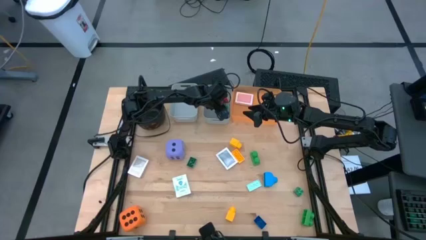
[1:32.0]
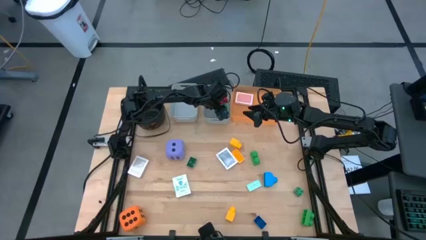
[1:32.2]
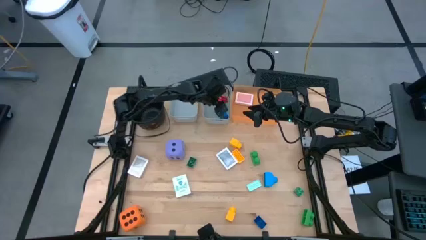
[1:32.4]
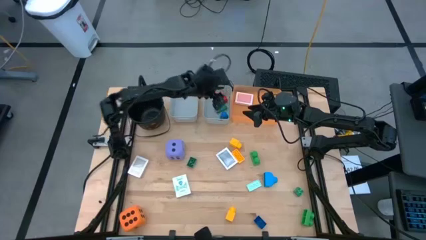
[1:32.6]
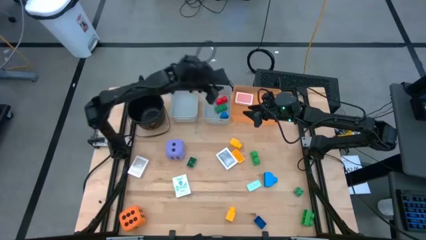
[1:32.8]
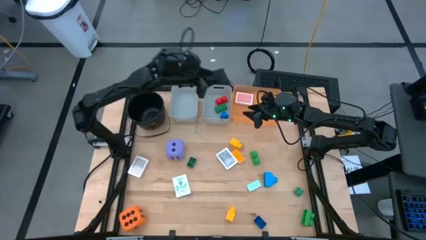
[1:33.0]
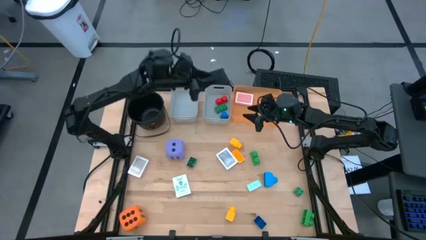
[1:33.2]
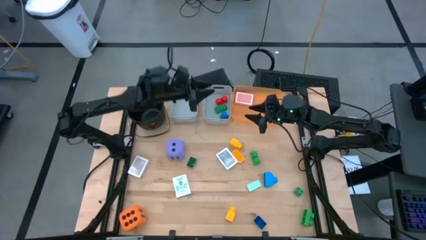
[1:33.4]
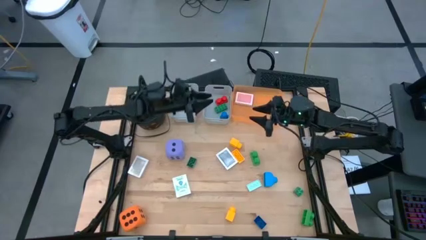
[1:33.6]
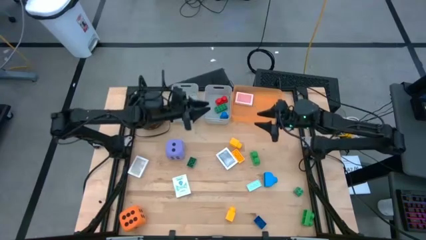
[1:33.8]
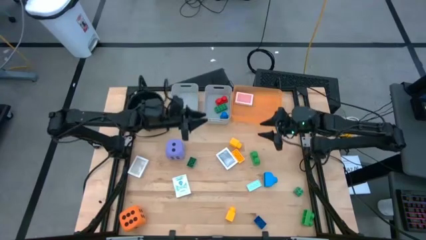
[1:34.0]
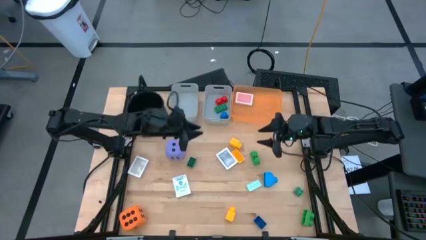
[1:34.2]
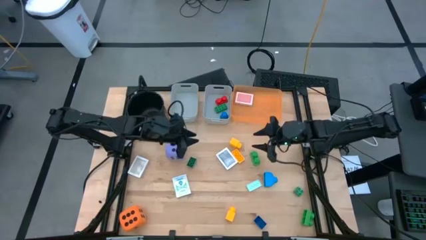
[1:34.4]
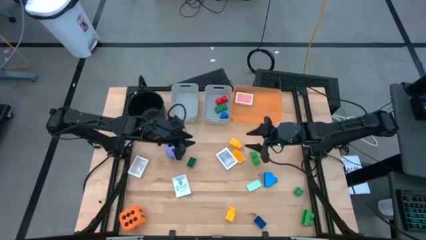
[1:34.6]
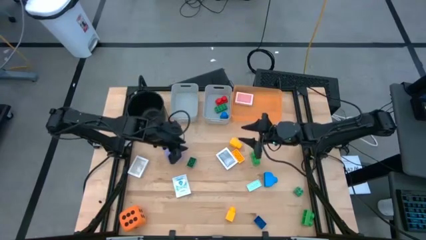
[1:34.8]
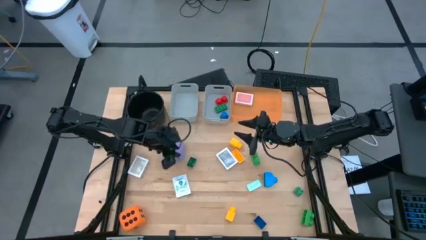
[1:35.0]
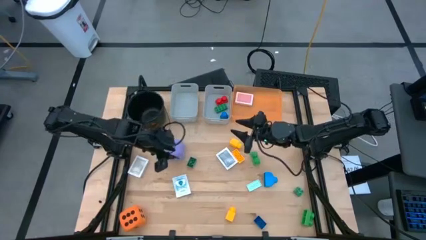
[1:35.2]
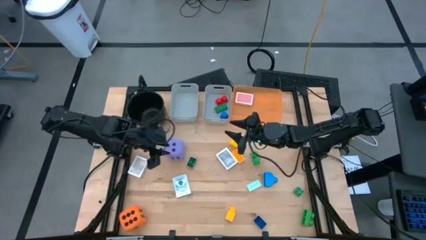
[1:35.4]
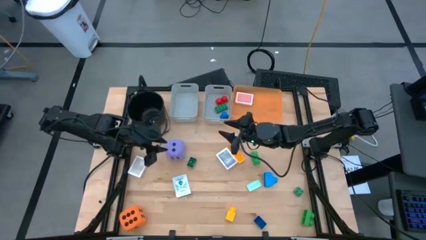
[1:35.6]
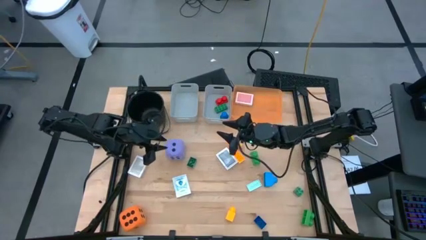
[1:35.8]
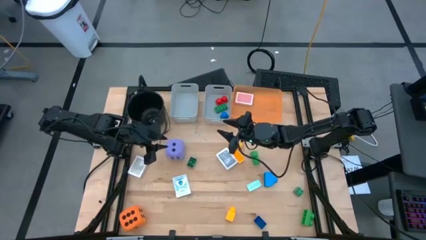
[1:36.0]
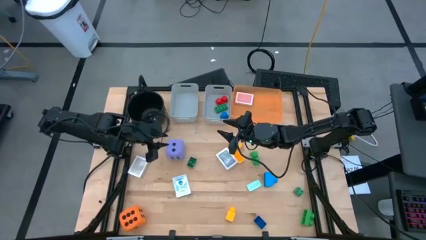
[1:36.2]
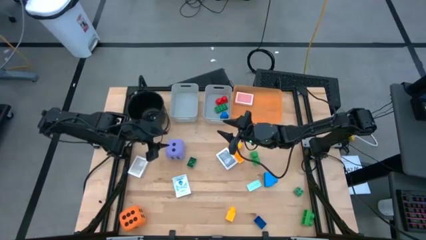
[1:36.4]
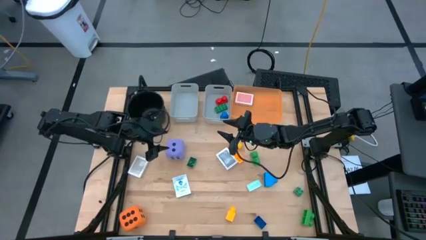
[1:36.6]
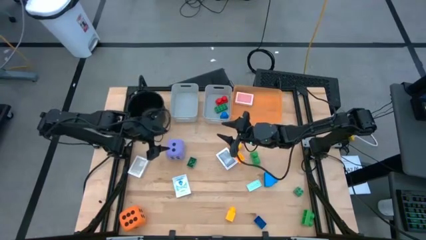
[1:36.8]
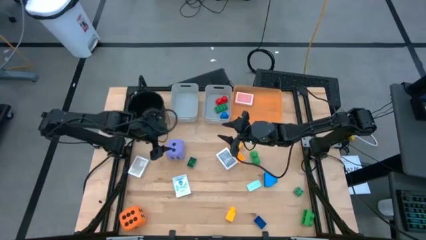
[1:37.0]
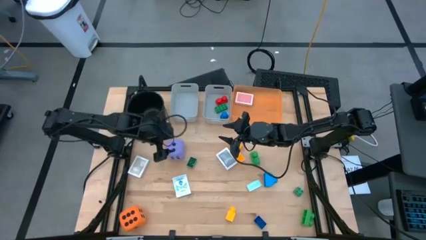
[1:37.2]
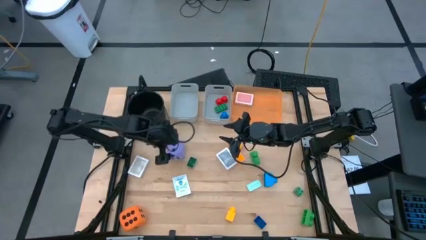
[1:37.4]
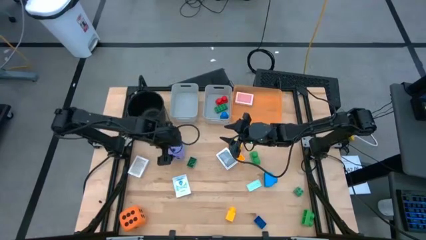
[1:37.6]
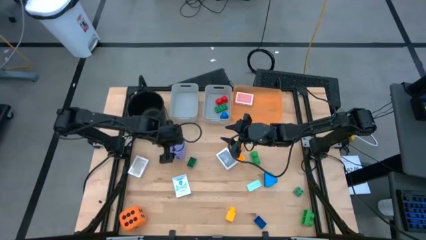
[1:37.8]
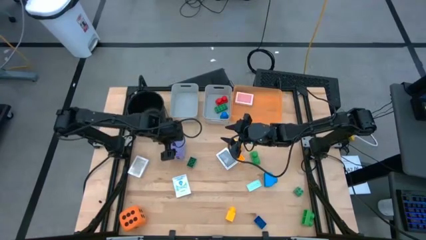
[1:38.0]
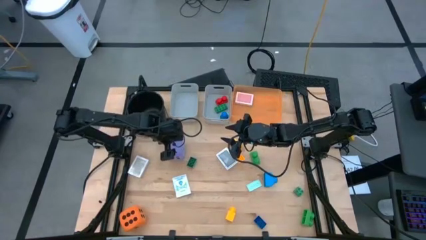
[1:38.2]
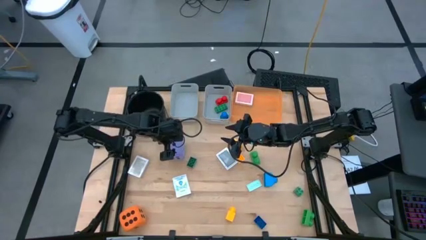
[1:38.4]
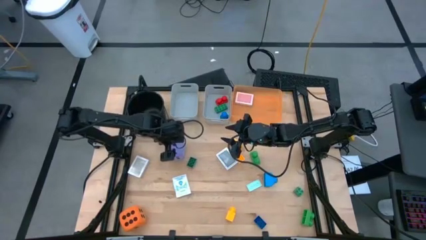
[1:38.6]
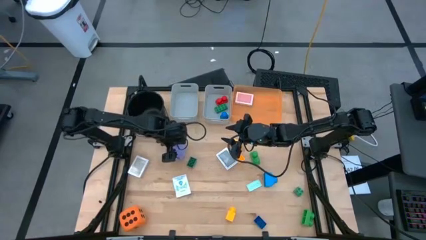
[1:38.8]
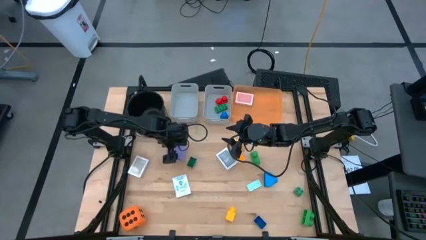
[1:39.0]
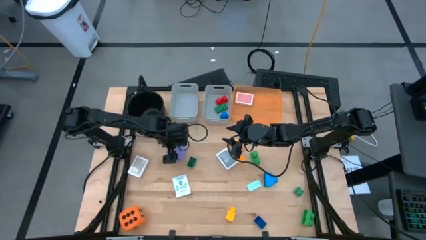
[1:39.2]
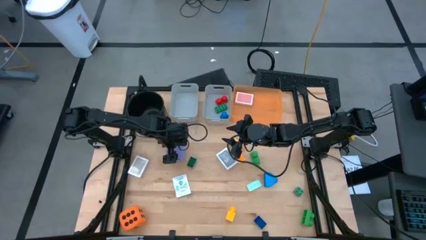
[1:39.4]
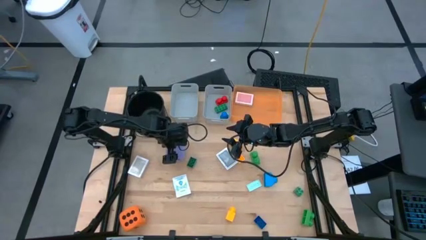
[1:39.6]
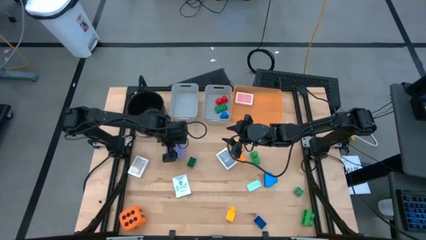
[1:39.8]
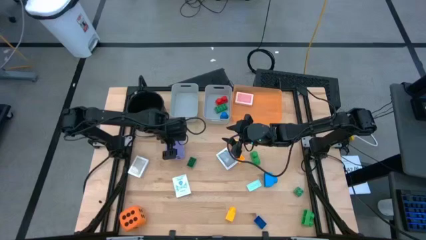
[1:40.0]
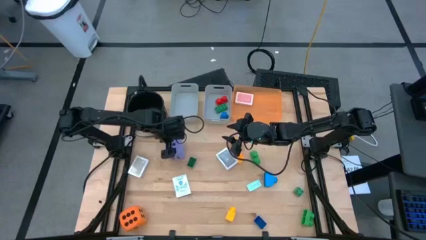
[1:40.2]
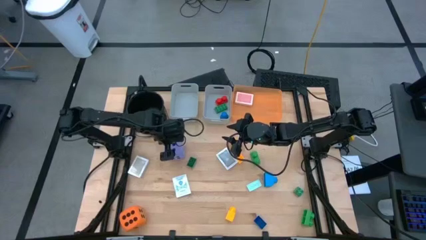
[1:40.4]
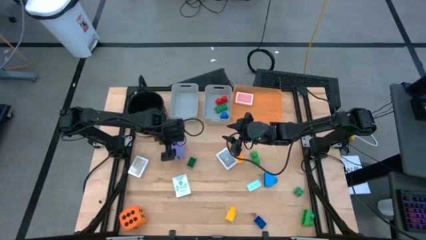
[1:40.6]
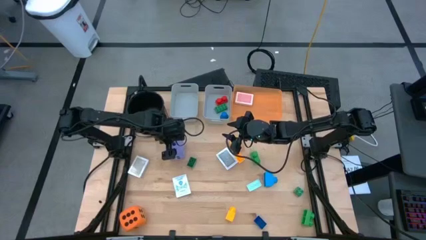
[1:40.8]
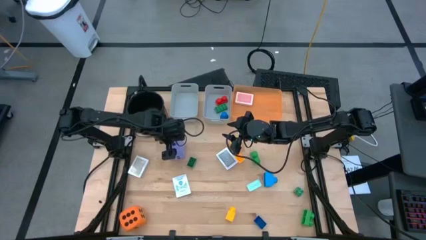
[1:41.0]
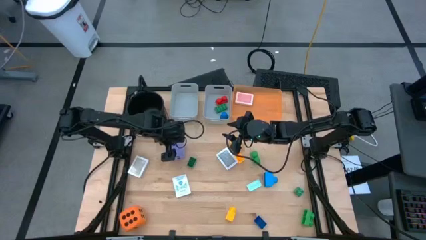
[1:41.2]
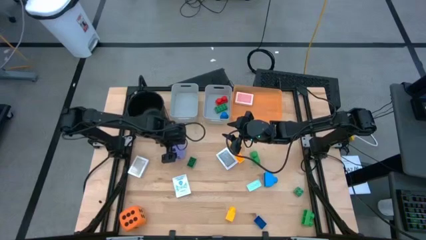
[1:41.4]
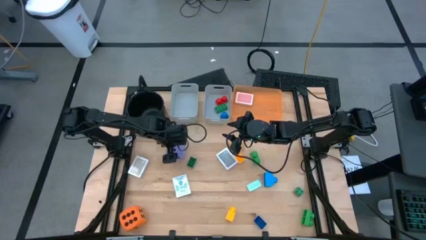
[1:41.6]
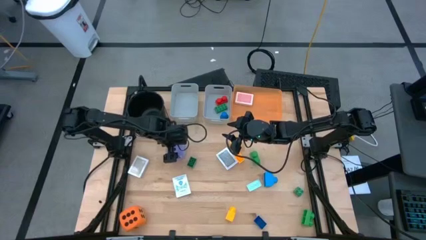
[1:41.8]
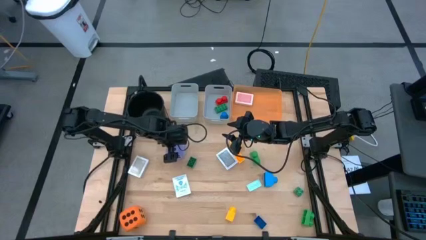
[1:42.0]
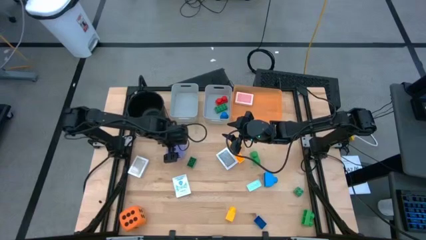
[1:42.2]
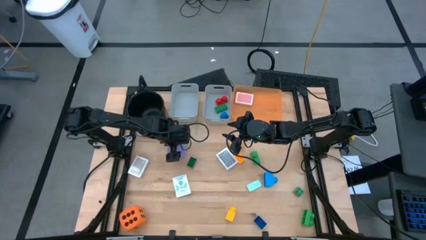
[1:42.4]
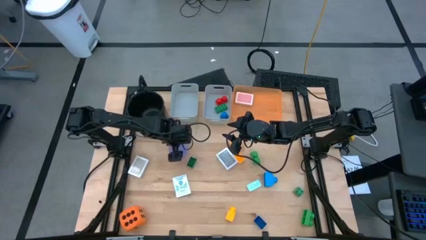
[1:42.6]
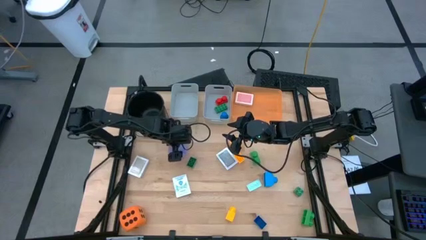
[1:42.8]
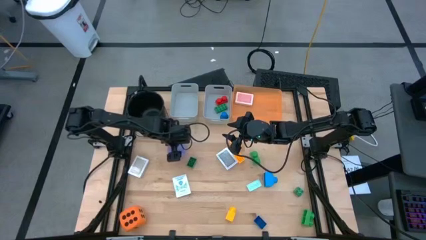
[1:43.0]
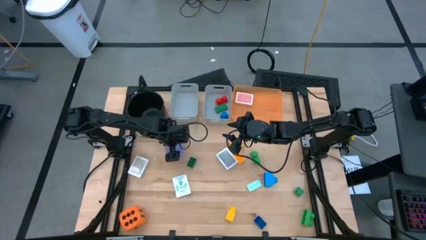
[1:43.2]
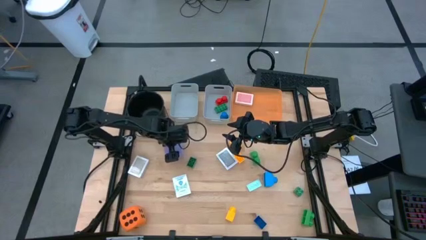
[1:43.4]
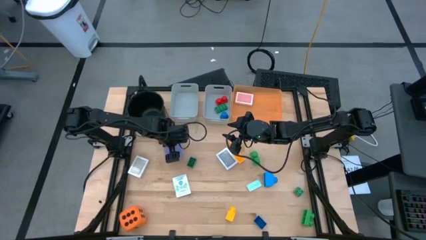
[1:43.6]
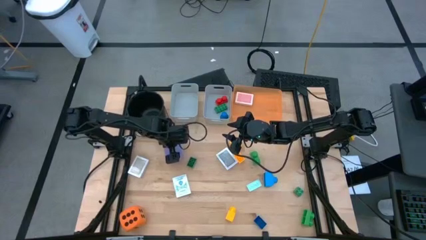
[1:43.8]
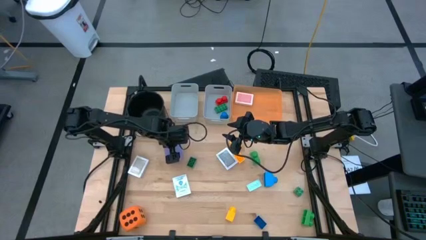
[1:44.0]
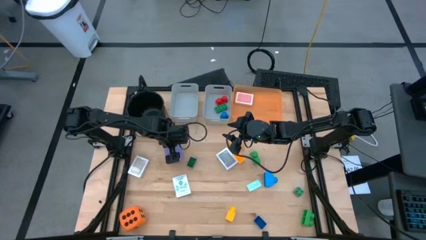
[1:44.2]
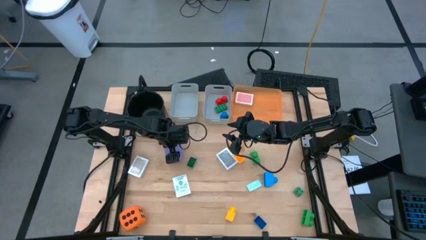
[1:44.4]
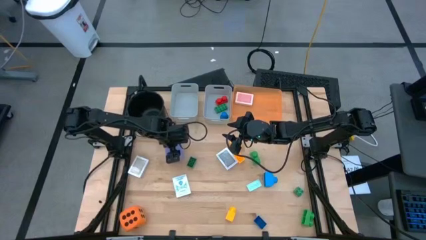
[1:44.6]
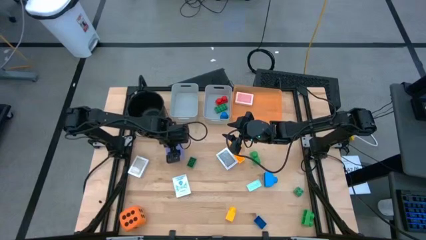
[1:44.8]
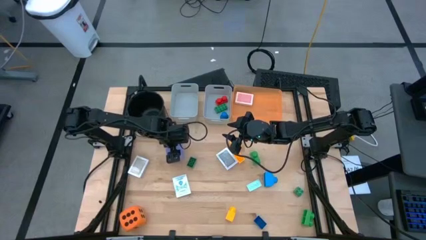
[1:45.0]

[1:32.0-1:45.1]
Task: Pick & Place Toys
Put the purple dice into the left gray bin
